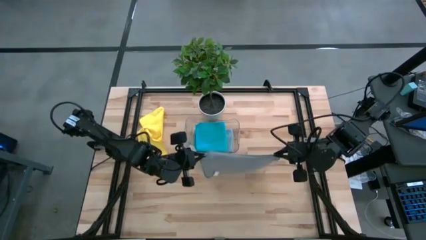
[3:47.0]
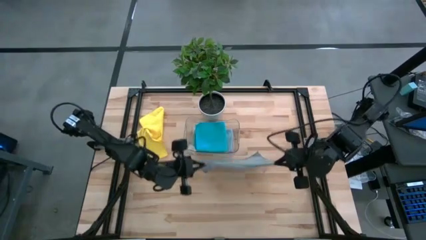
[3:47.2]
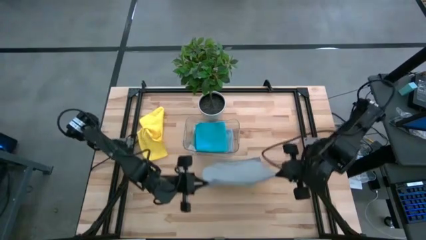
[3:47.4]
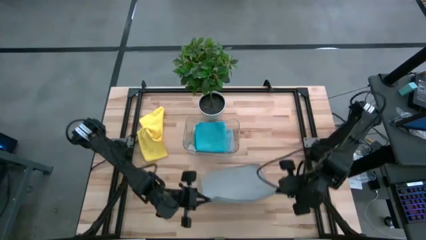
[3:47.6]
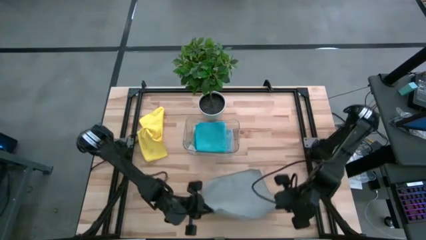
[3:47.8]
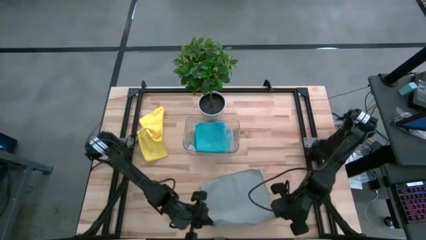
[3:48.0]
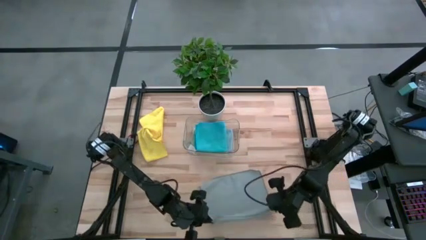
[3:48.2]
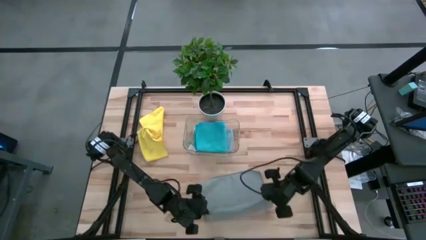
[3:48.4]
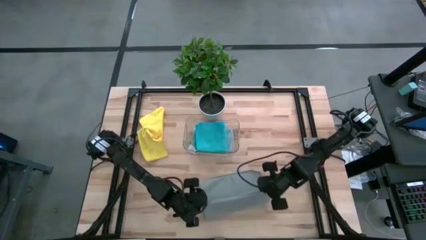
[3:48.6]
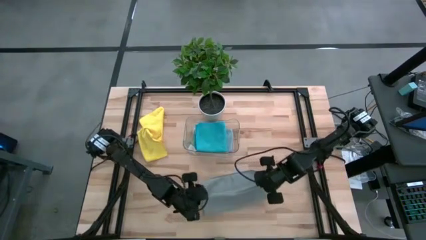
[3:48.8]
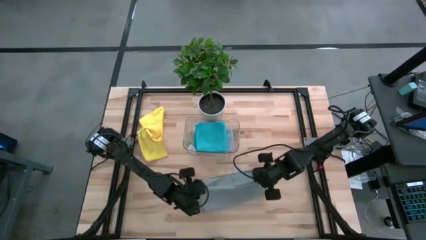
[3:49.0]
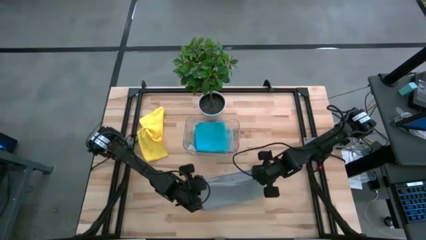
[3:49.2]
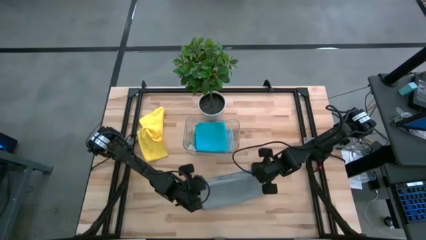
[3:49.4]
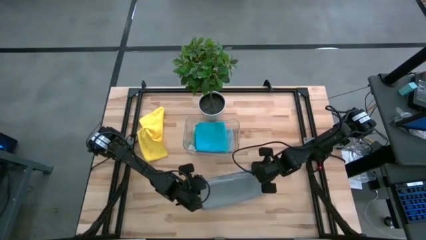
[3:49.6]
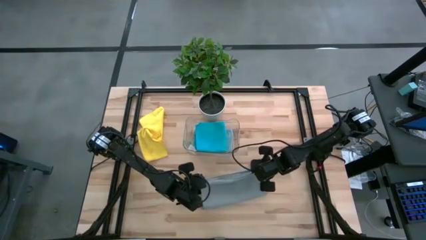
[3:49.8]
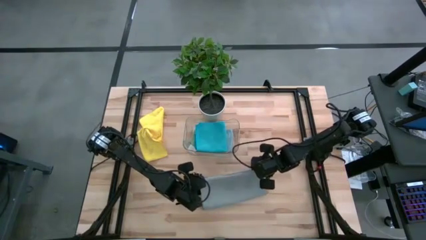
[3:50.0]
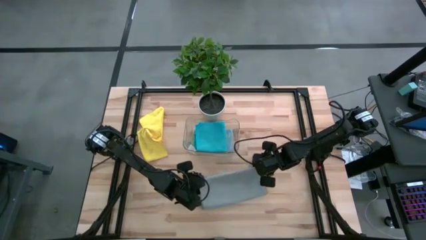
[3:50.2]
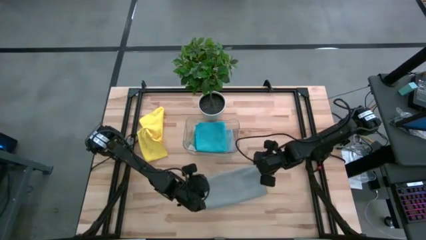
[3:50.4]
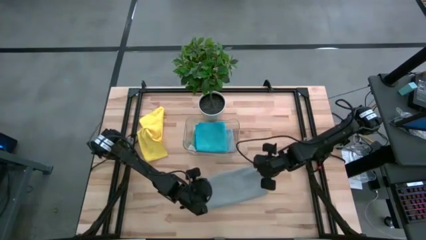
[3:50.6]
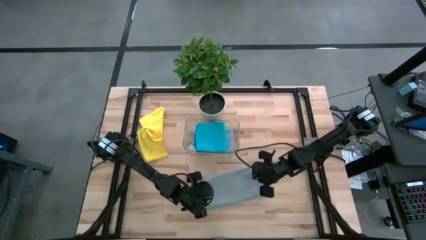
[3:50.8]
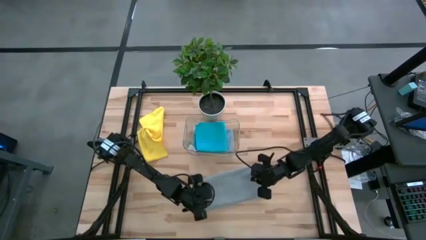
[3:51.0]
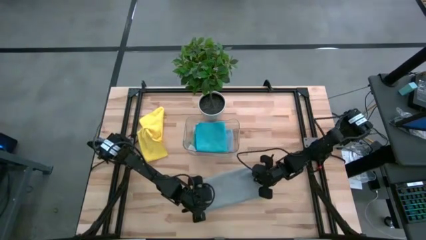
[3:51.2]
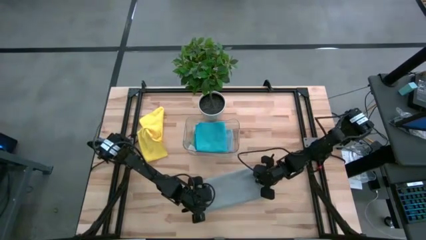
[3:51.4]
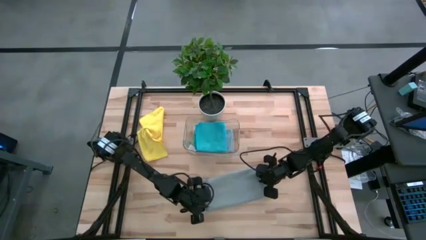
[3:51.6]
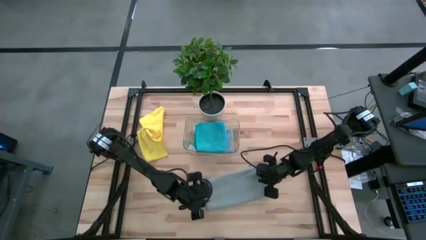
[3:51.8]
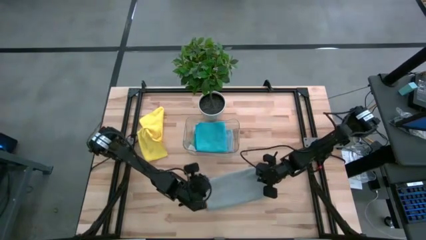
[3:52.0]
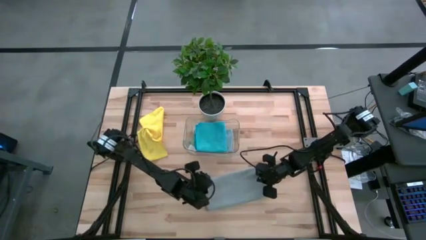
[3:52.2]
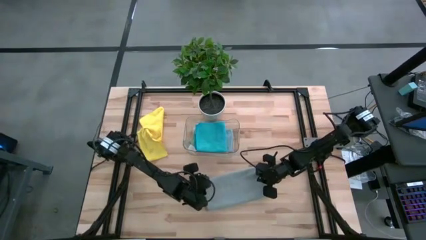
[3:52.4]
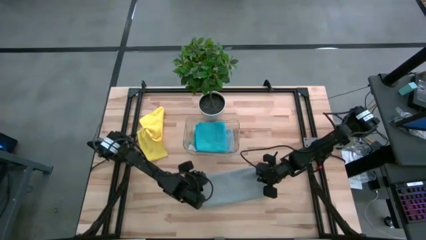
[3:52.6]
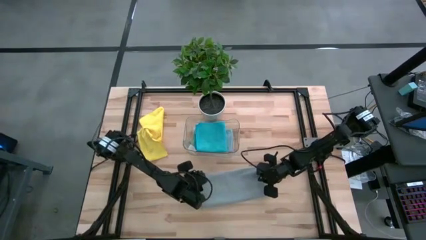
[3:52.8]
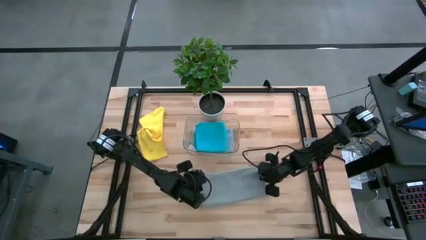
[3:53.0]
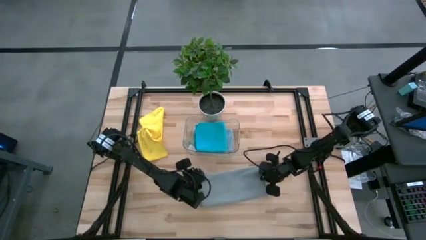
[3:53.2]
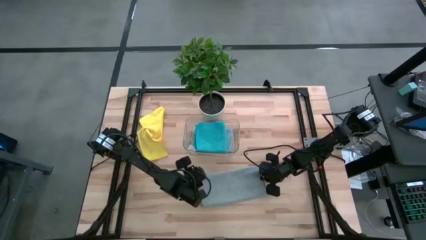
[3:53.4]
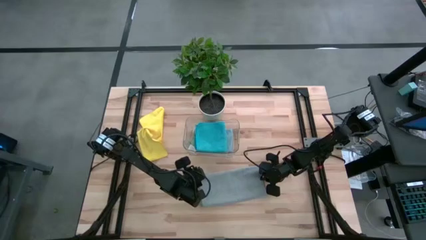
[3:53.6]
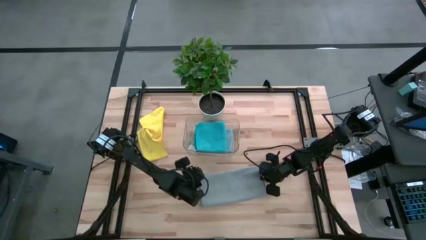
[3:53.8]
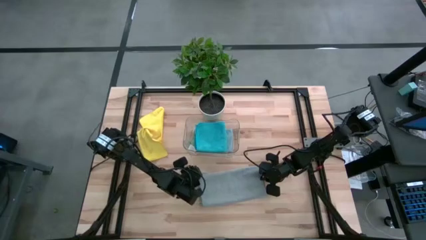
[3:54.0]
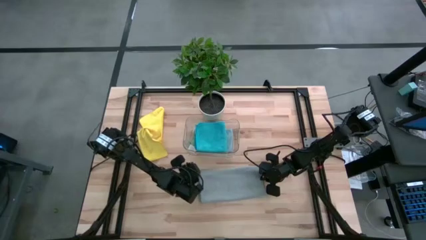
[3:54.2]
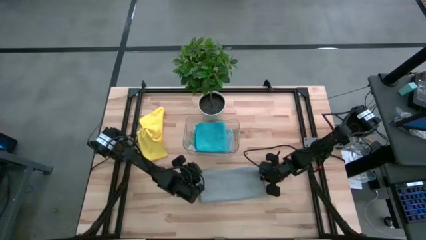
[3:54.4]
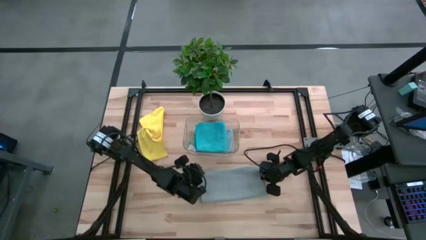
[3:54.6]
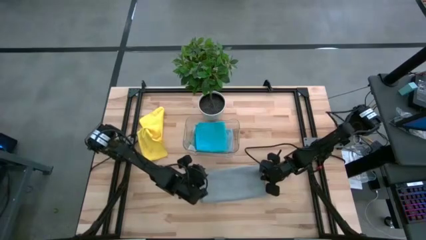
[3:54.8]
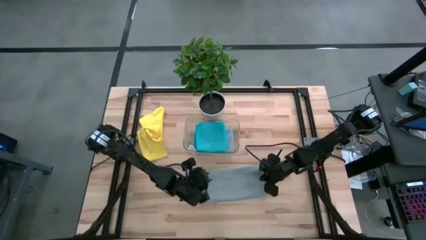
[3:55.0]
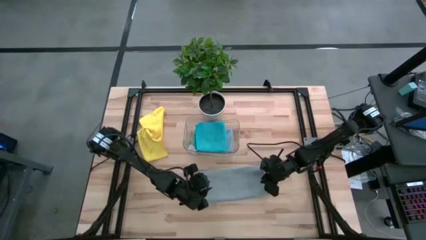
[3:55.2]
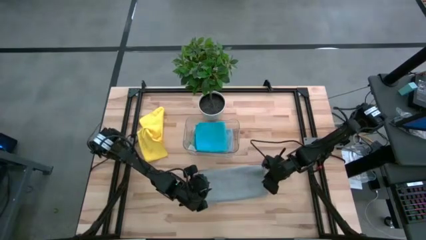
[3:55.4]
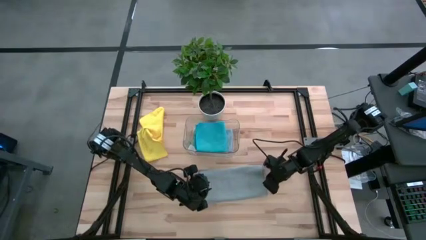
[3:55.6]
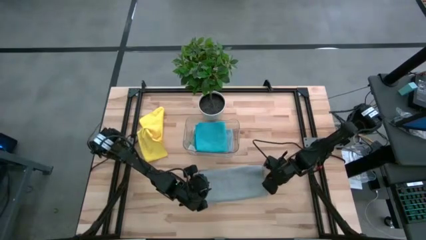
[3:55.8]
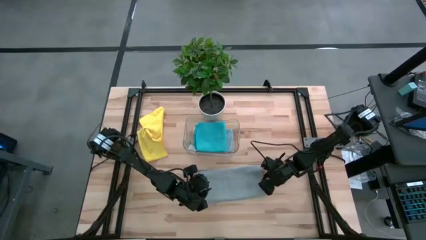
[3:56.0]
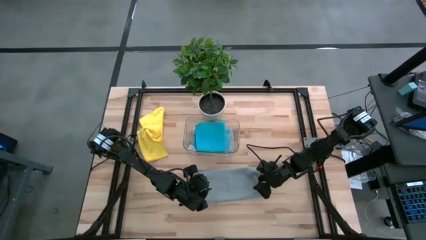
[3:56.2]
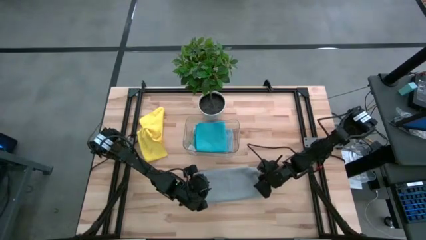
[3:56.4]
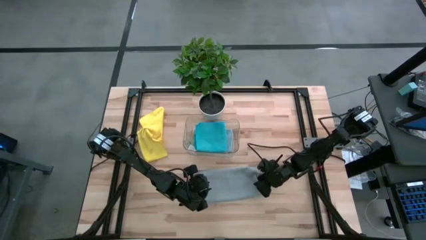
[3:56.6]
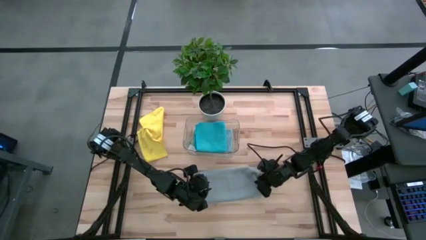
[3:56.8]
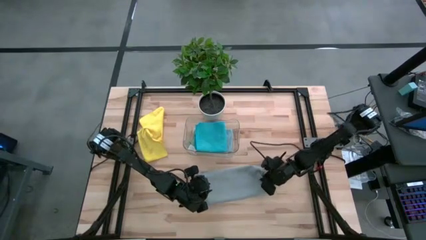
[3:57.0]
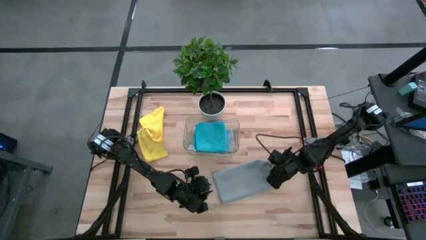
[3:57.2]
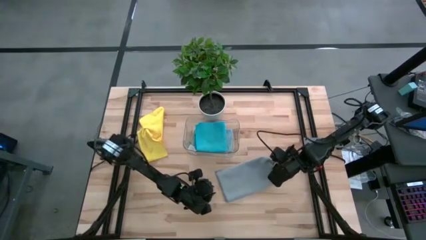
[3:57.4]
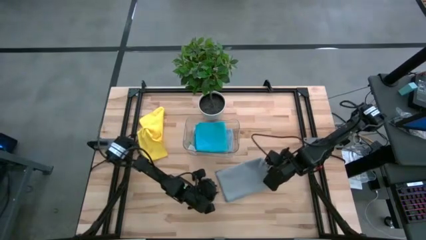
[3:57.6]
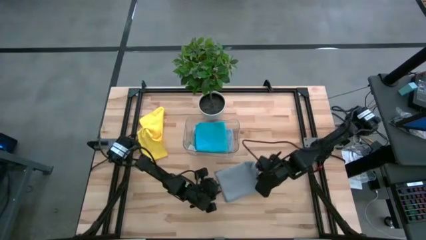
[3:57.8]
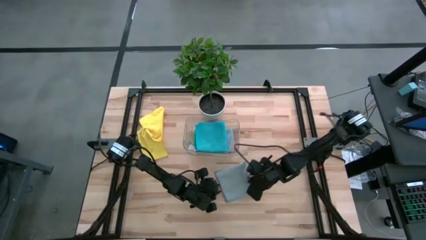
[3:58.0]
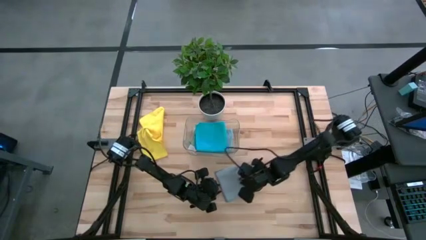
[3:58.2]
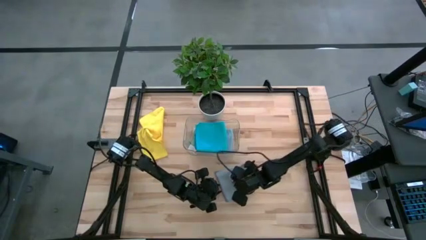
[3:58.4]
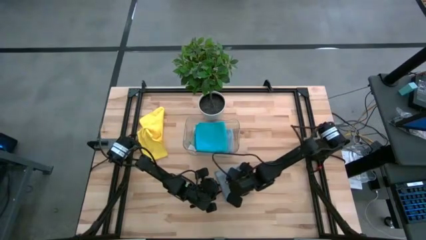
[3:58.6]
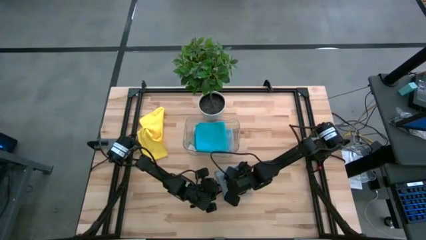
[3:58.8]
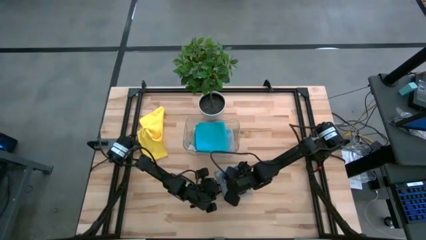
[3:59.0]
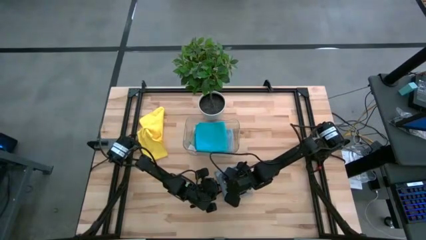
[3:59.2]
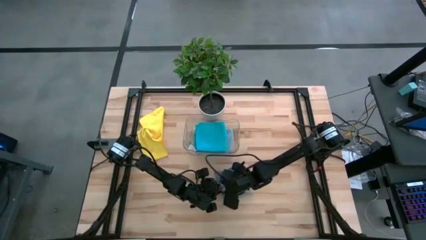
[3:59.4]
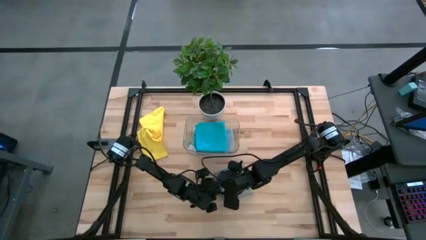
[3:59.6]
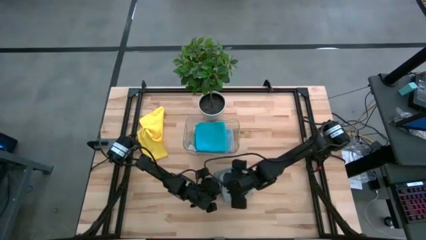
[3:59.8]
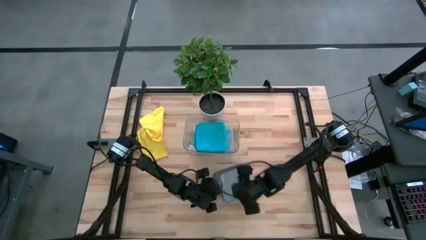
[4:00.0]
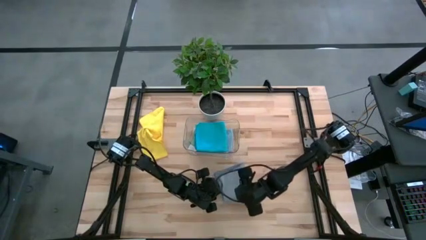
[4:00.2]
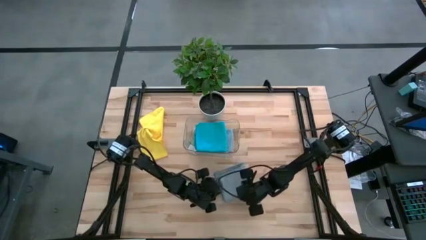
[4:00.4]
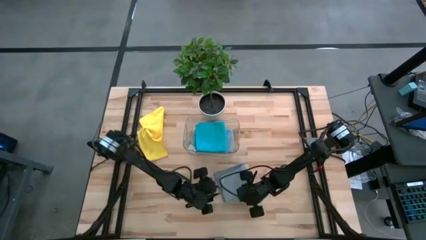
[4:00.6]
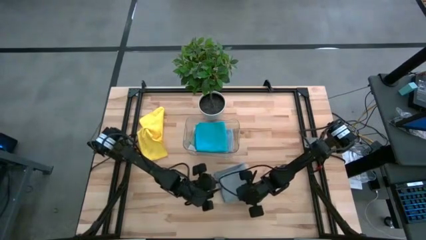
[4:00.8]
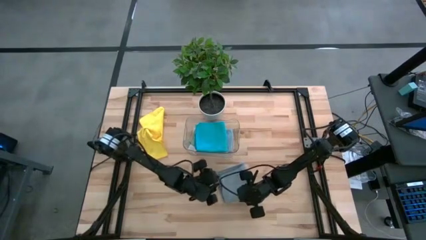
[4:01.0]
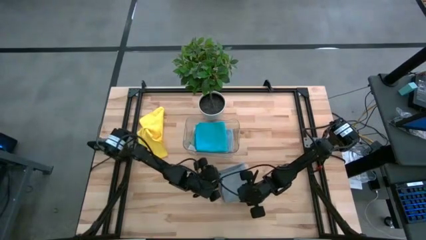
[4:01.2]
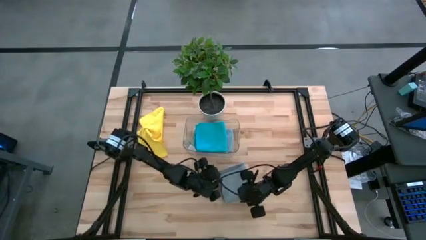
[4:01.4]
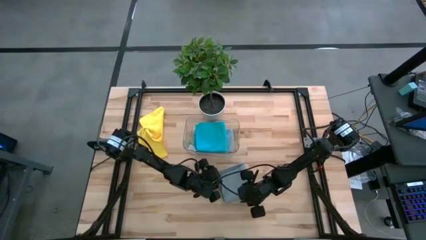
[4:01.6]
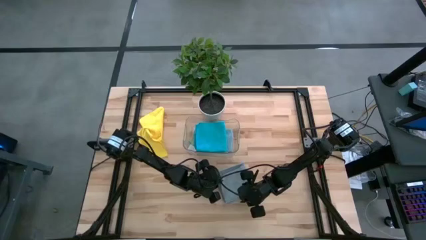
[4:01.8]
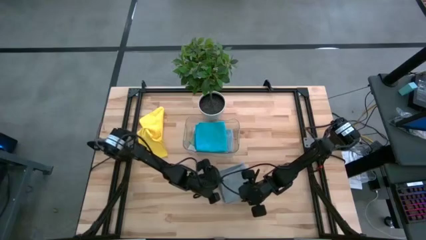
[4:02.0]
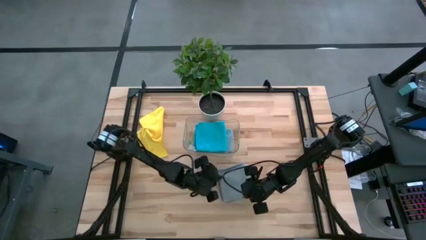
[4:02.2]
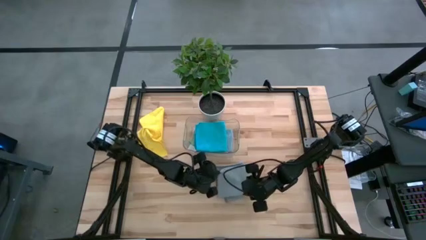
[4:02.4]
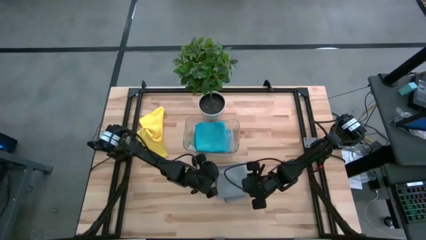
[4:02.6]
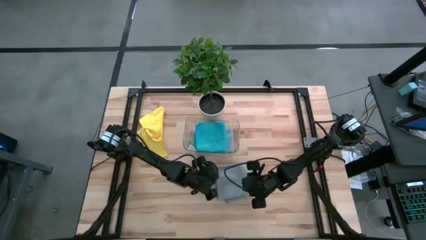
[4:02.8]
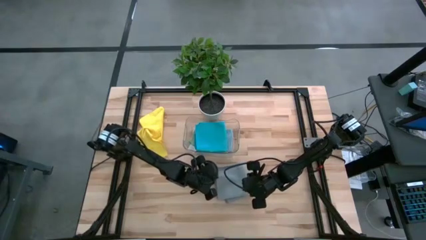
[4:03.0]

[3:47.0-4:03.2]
Task: Fold microfiber towels
Fold the gray microfiber cloth
